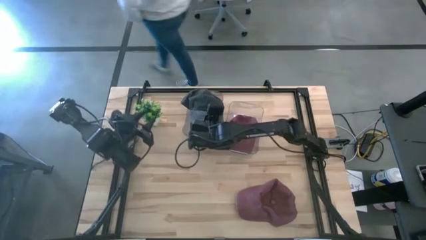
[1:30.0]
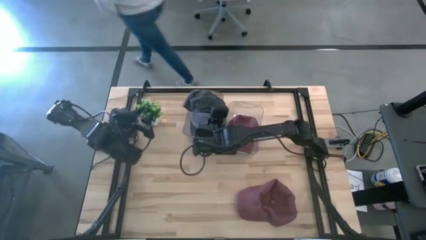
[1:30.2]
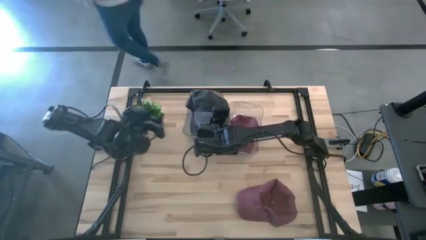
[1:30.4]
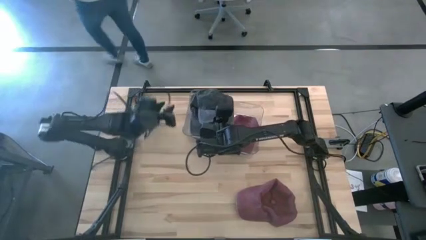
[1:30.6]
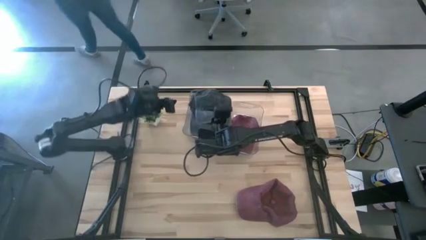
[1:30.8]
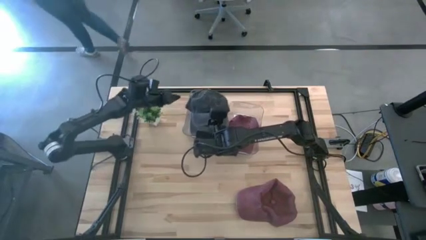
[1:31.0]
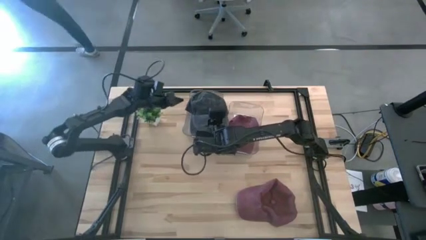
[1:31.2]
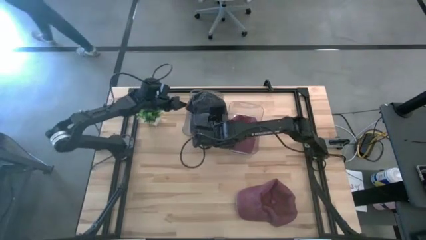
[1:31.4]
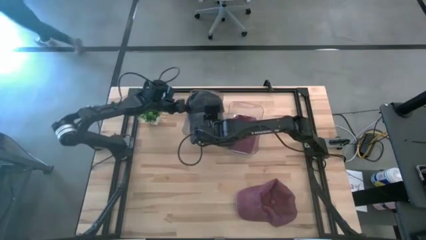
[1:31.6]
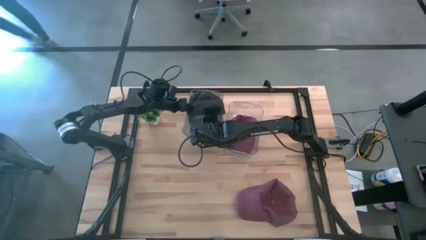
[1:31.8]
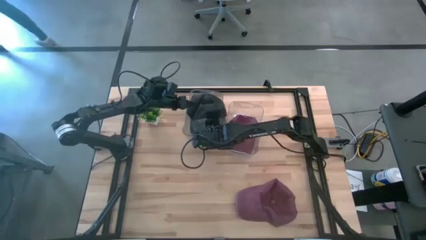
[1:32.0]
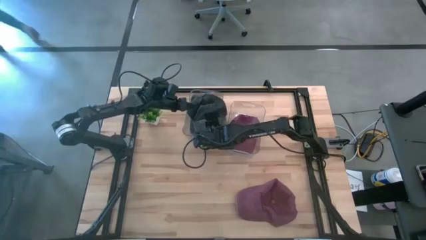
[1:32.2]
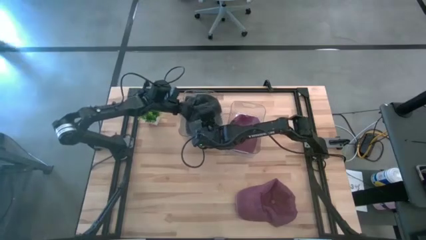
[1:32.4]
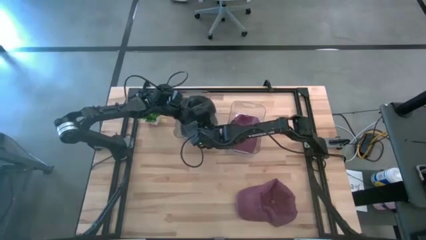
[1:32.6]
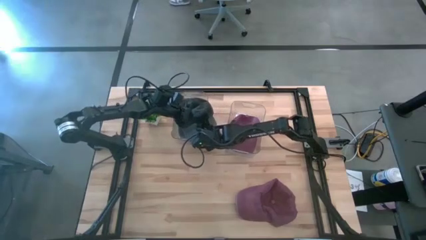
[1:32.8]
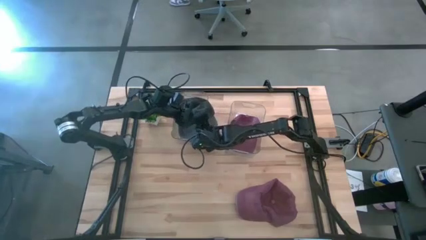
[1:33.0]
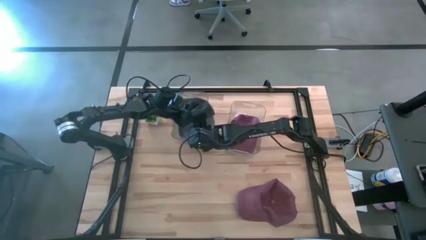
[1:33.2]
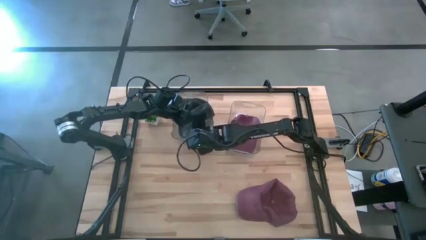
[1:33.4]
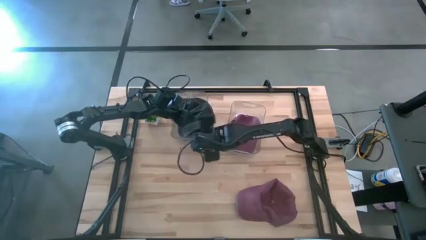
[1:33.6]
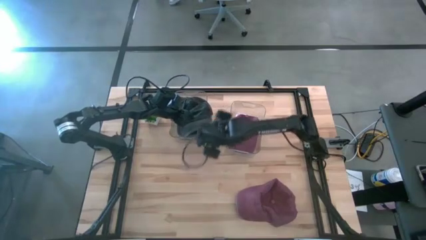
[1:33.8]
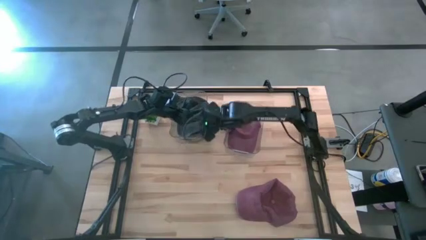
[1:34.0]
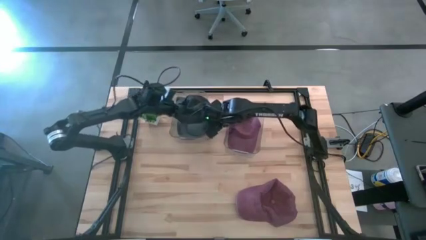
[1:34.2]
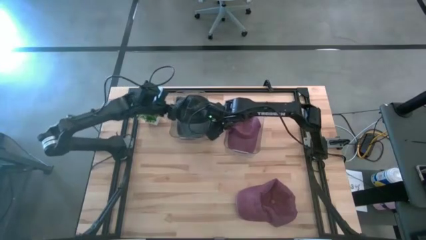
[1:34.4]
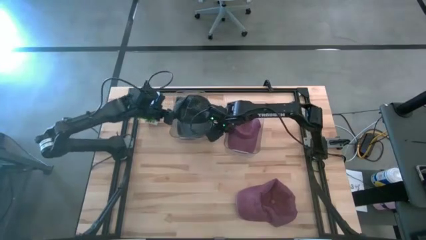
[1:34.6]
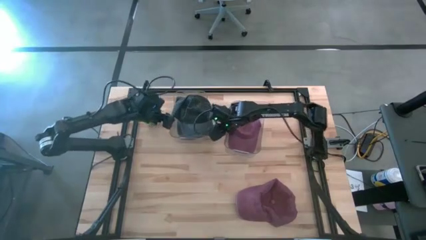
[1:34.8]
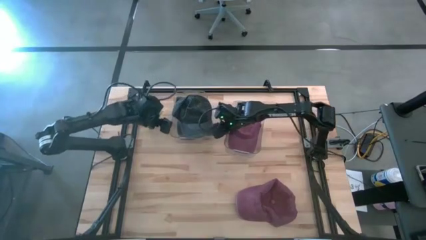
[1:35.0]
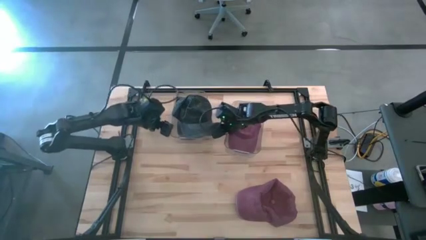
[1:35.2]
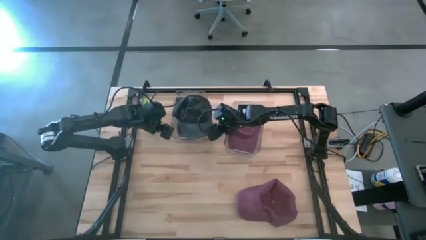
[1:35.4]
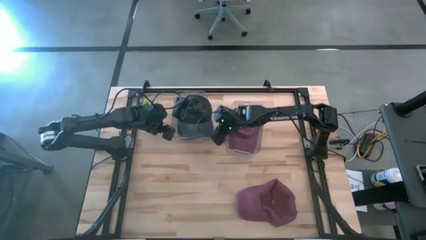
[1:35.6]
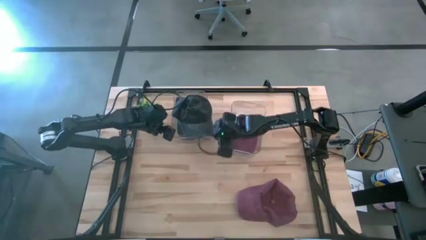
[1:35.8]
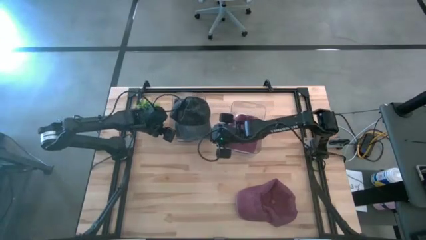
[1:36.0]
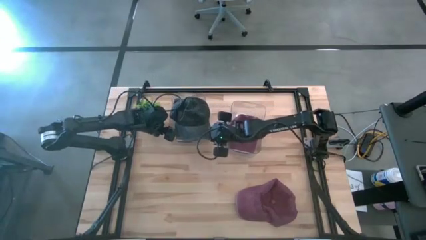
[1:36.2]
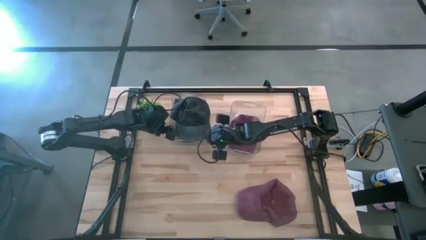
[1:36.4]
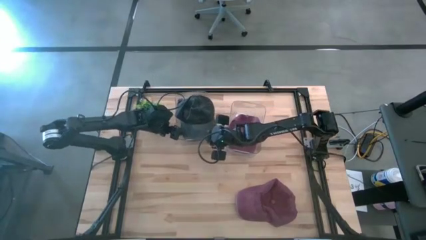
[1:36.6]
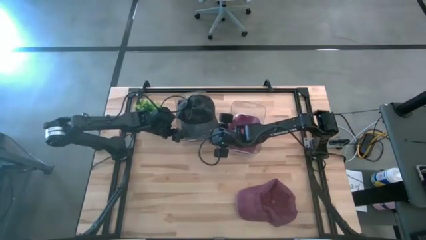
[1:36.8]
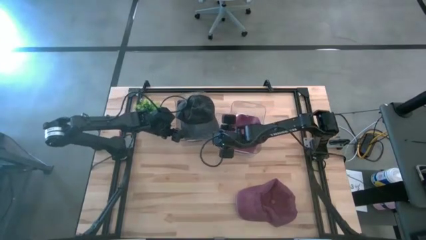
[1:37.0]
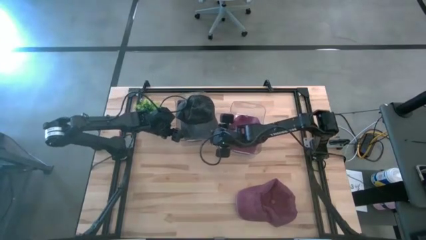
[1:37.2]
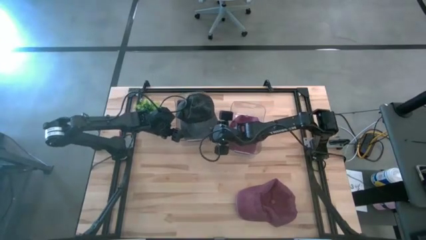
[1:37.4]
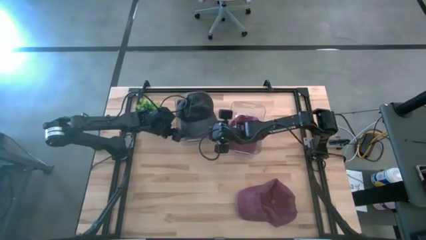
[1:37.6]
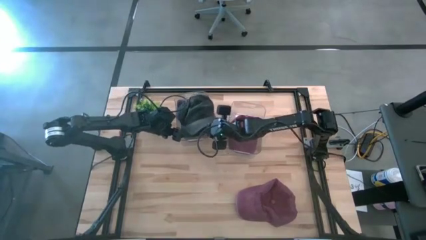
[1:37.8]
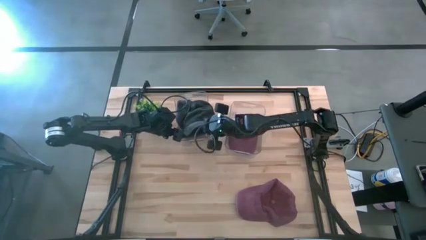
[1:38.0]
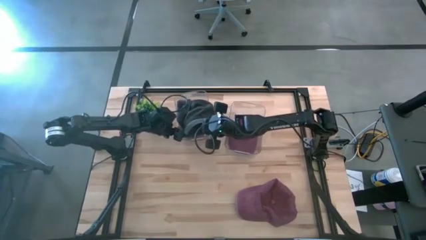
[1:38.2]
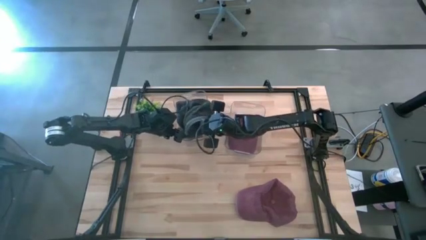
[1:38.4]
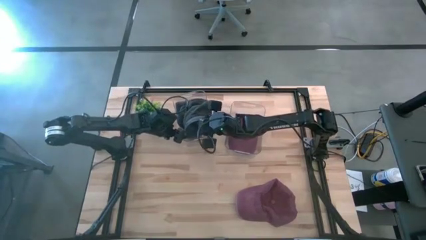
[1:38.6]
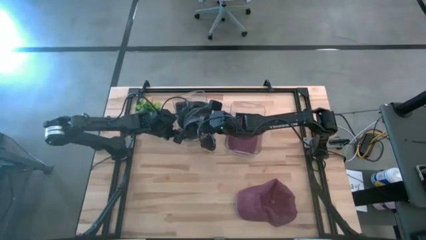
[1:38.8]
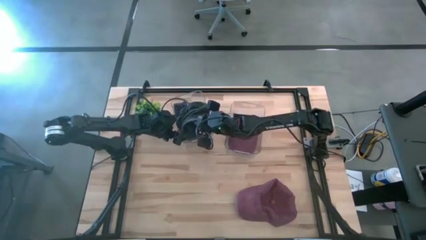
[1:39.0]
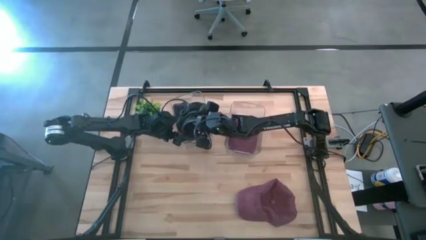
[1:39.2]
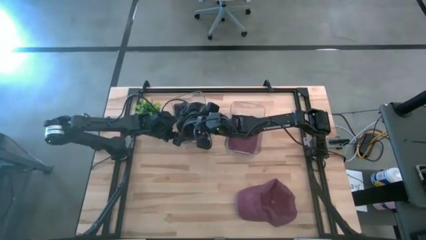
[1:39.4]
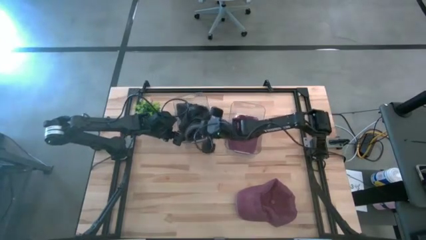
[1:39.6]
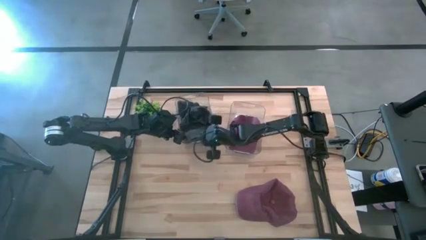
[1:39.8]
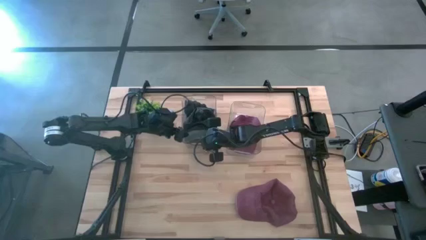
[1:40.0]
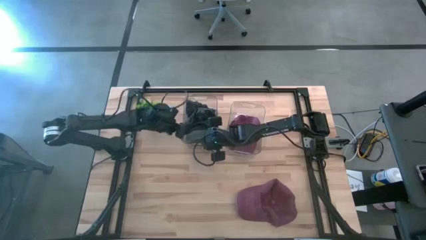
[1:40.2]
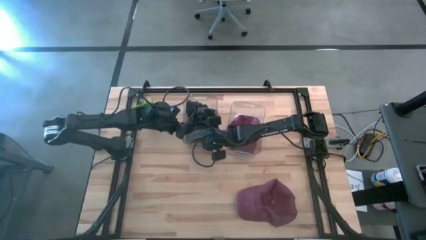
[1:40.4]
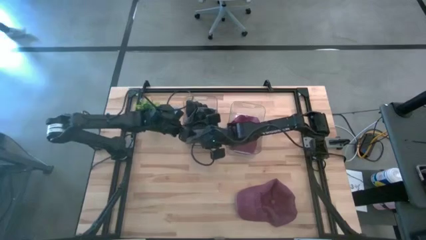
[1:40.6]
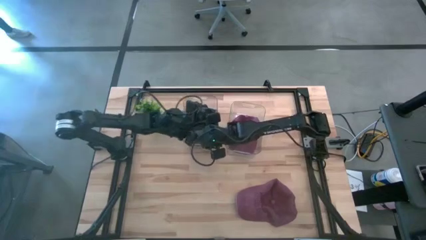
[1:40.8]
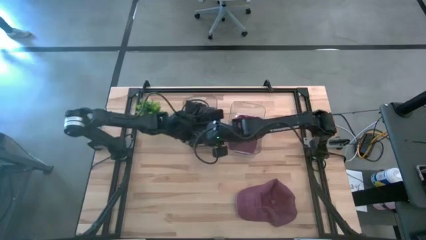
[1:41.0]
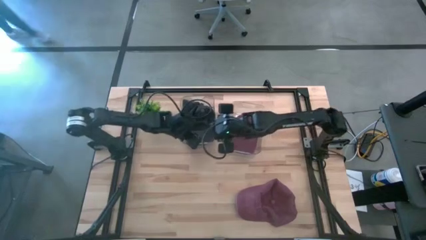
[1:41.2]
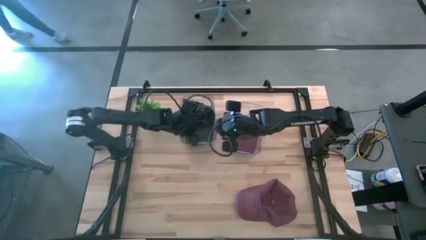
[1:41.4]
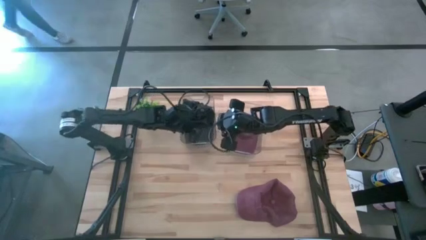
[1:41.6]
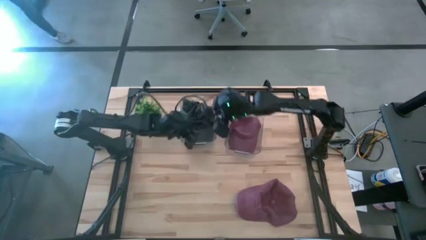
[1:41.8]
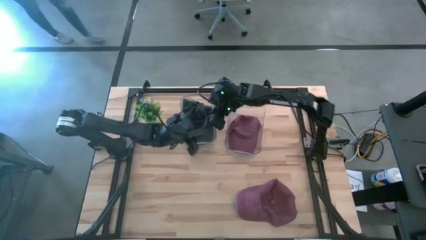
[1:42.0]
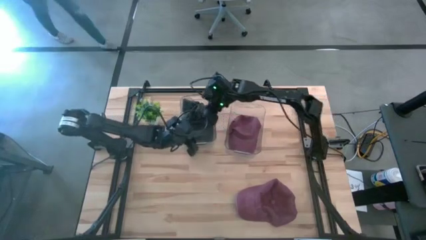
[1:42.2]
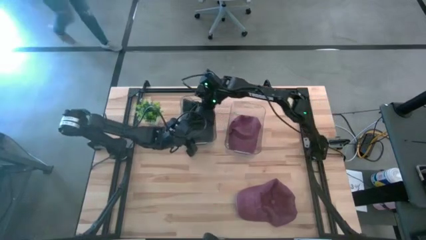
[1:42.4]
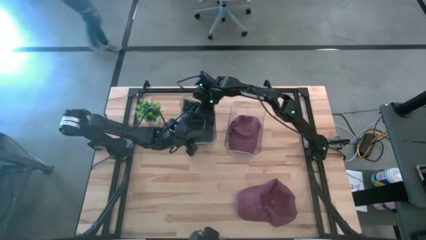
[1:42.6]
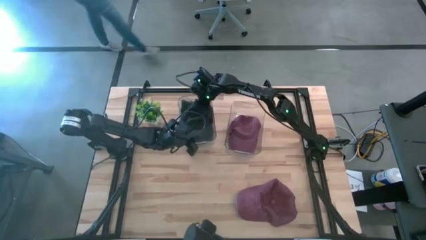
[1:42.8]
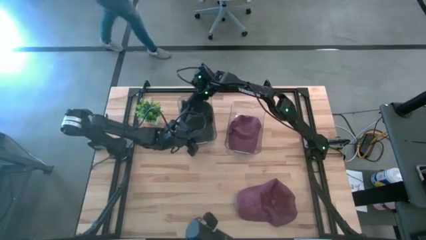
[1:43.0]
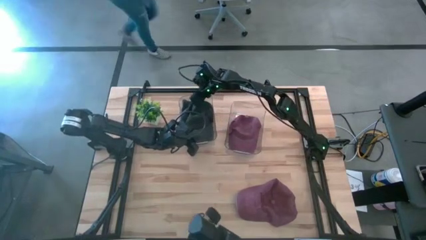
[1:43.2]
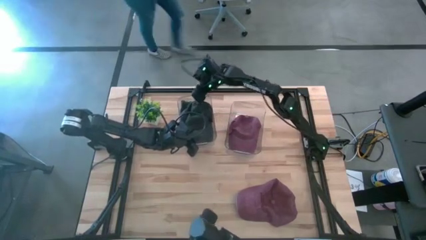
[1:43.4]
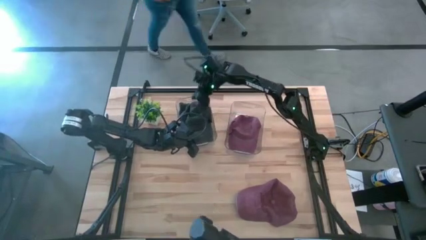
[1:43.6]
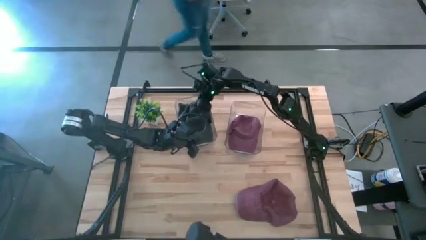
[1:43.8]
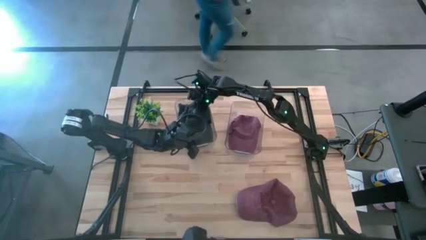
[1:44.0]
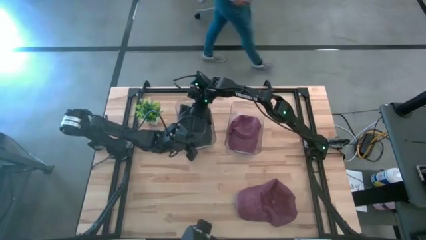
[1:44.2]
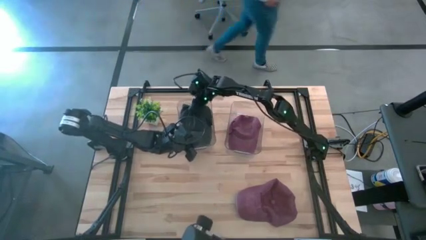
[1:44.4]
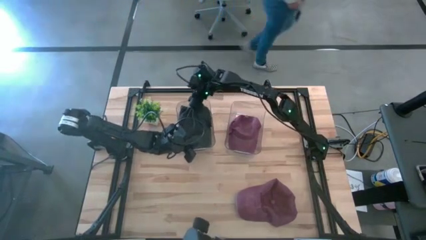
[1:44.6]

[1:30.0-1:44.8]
Task: Pick & Place hat
Put the black cap into the left transparent bin

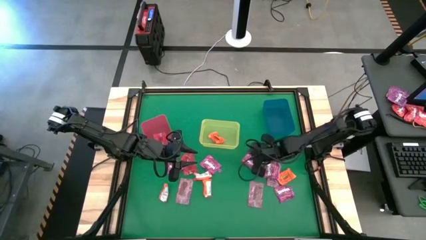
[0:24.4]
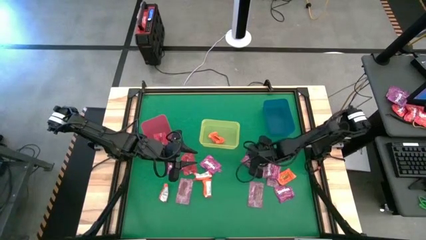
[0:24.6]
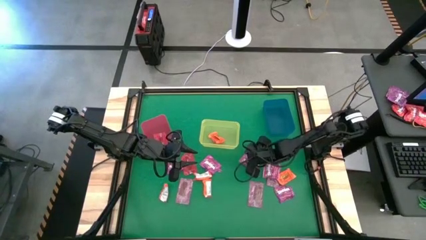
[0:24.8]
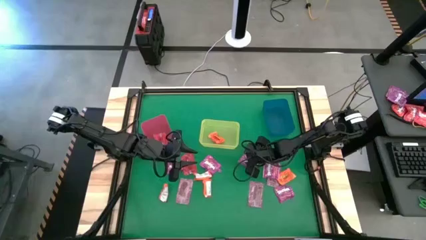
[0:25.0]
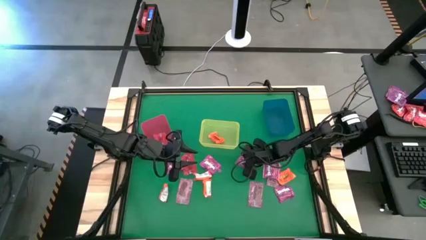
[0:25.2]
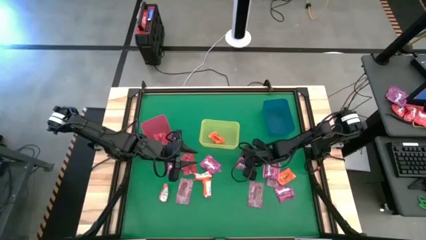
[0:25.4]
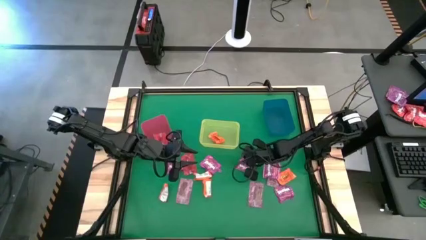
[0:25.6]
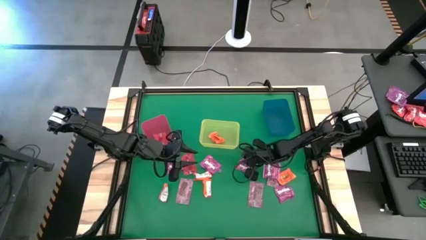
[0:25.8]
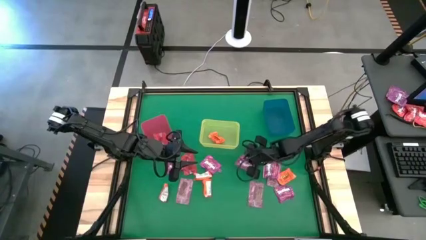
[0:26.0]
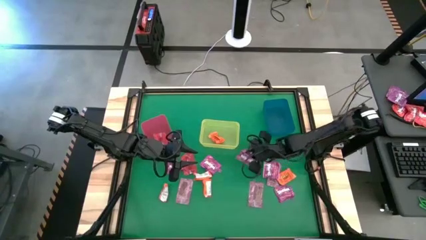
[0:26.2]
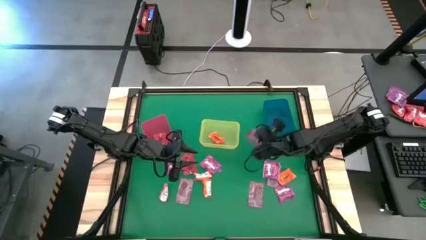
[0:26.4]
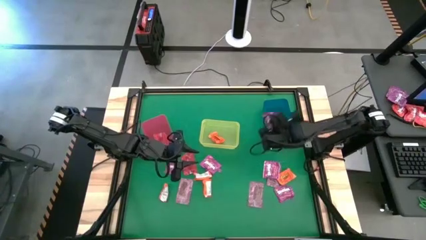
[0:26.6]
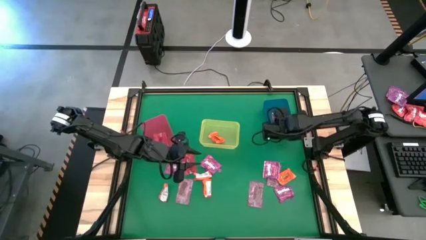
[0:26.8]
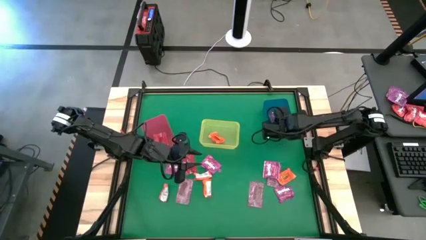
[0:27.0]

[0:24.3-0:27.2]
Task: Sort candy by brand, put in halloween buckets
Put the purple candy into the blue bin
